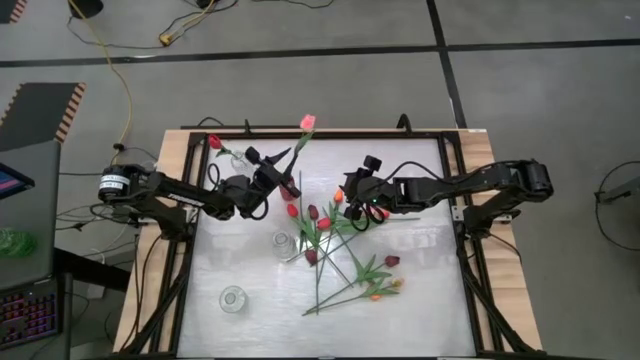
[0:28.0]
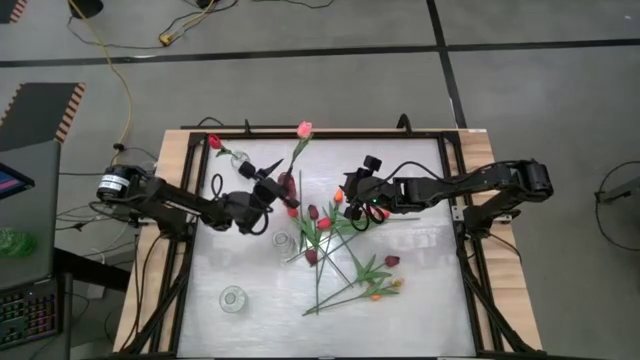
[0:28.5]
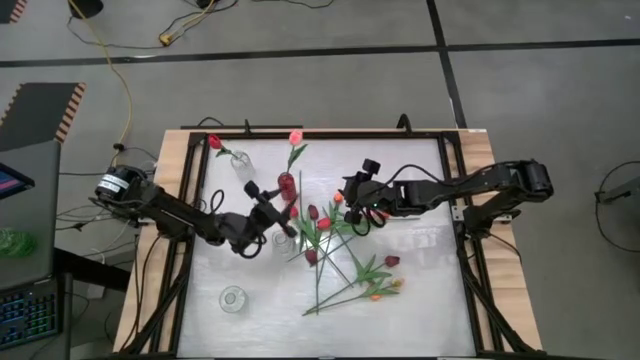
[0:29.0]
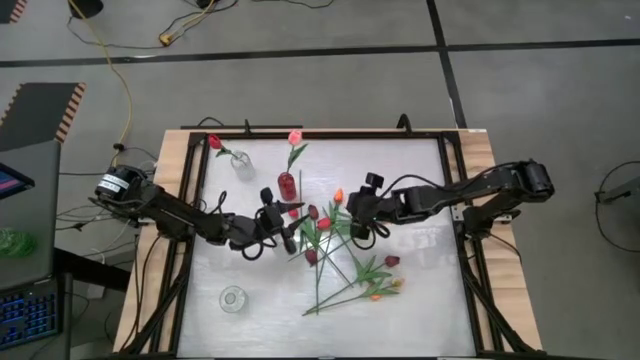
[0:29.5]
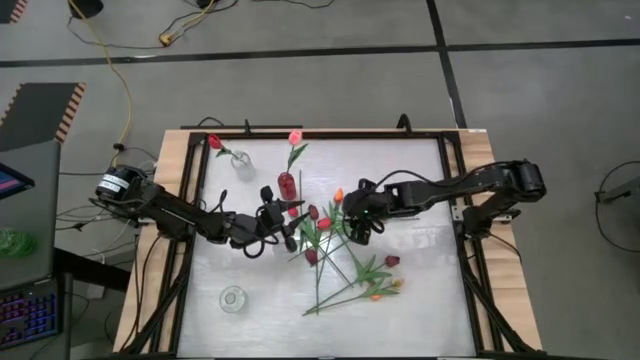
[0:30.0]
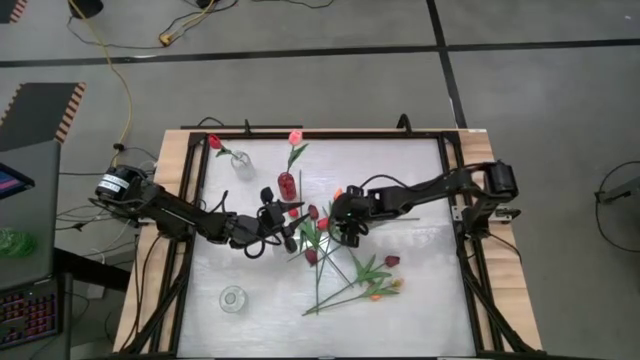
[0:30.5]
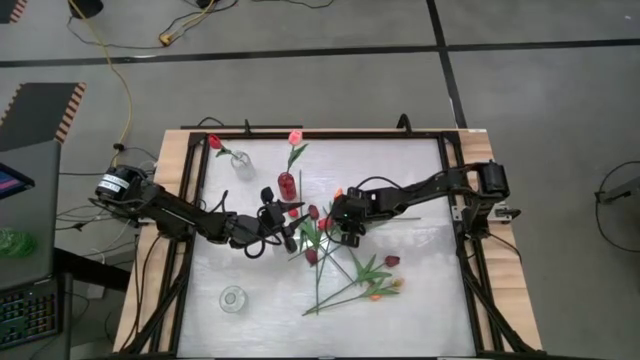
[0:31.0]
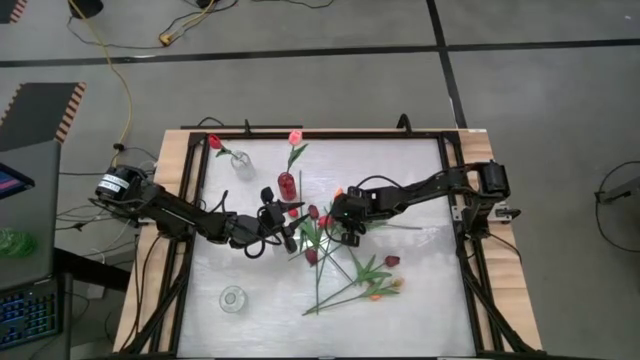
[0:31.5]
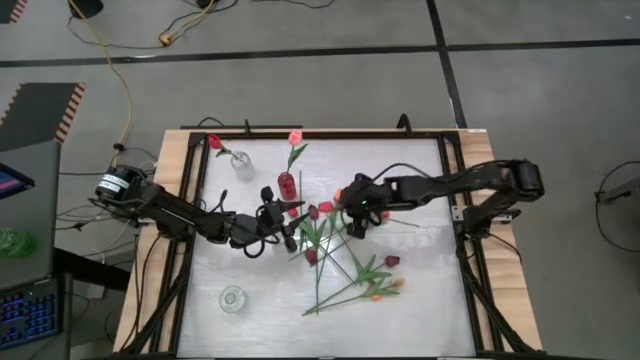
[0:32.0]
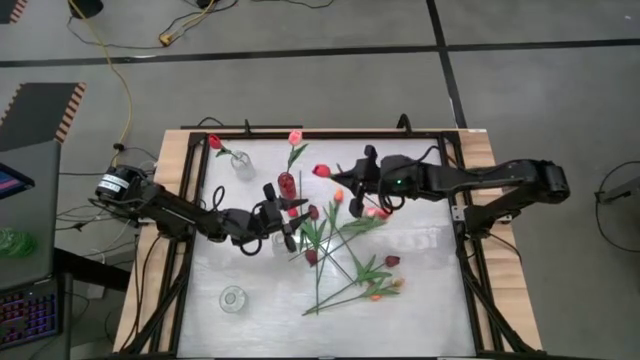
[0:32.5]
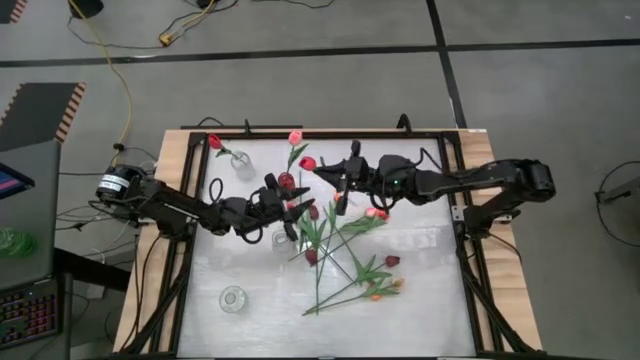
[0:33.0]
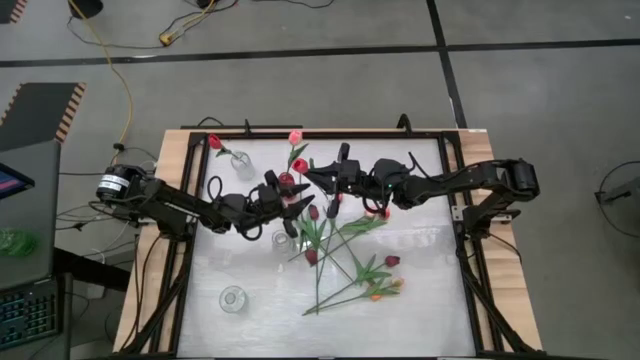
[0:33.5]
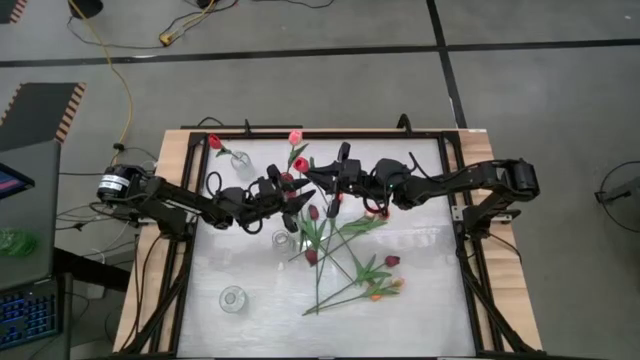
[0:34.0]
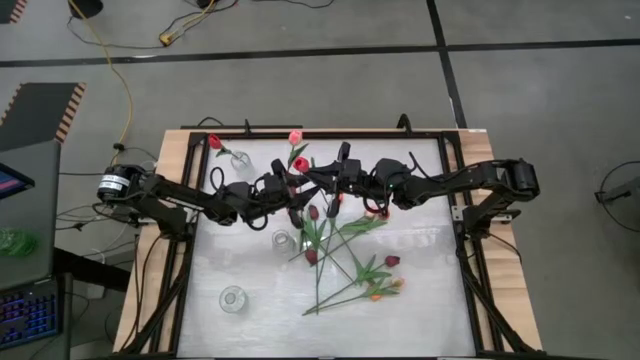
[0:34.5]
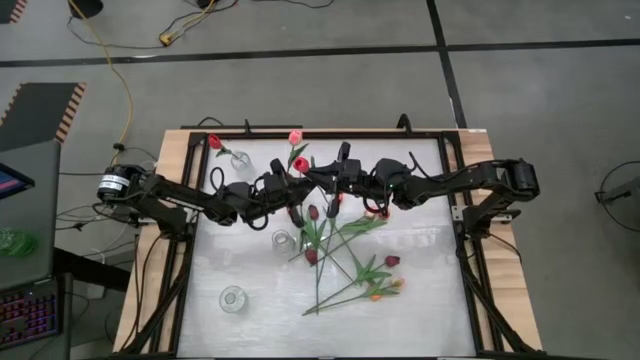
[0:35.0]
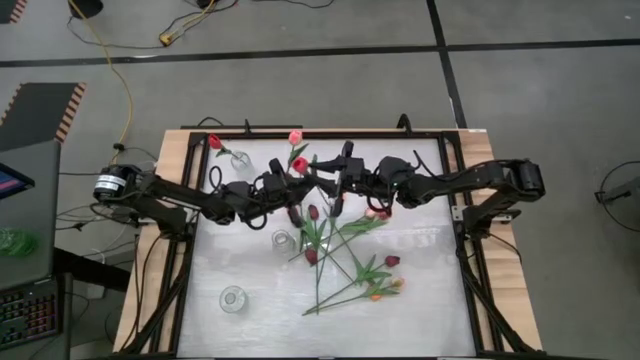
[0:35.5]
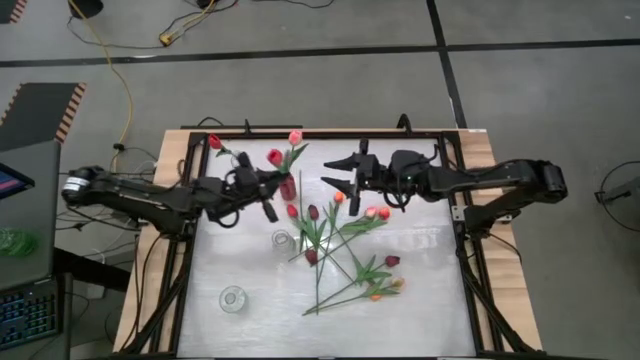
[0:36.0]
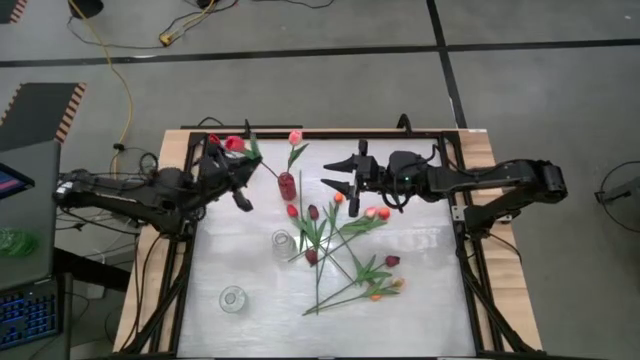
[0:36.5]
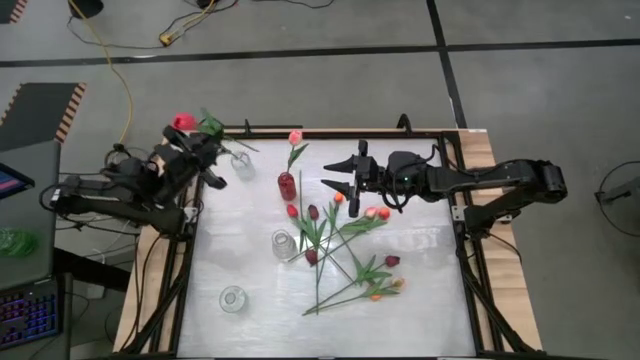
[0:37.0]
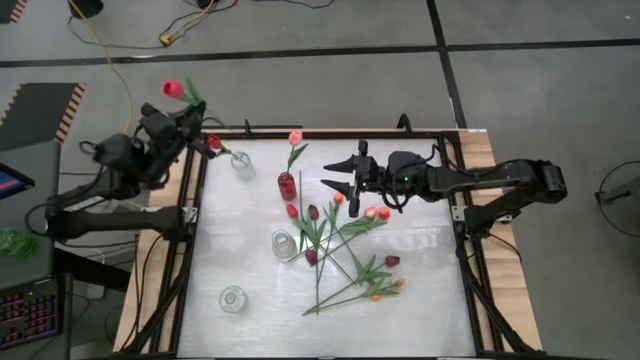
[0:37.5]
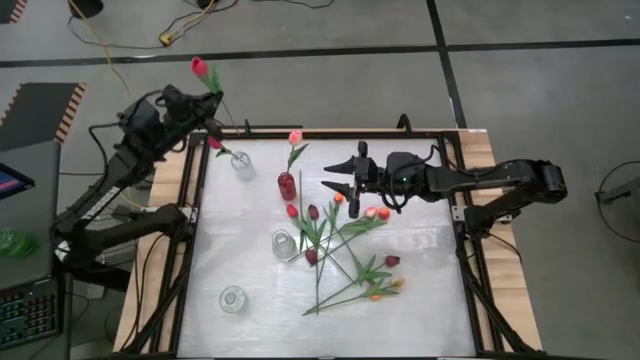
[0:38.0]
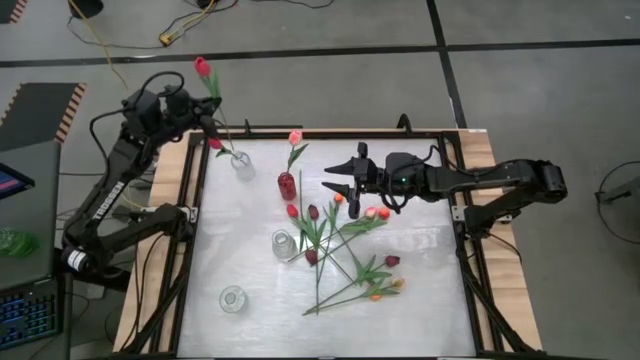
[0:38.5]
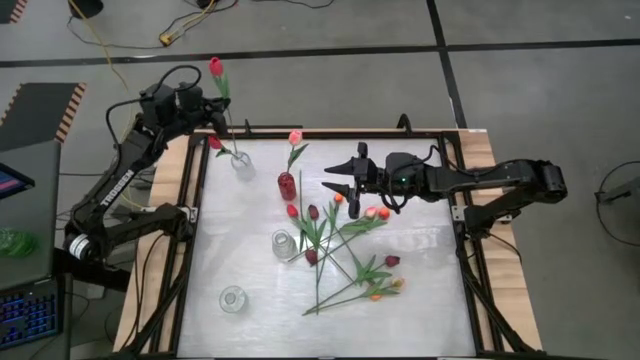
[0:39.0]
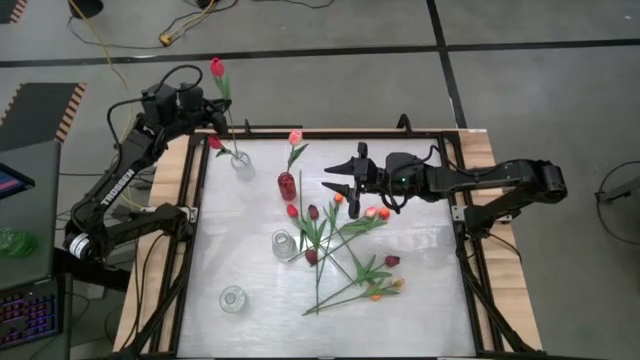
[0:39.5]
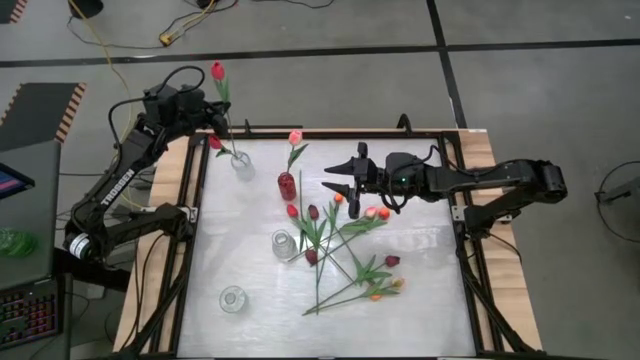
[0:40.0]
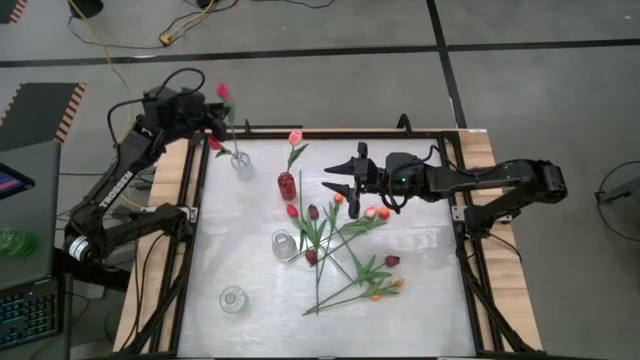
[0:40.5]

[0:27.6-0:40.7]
Task: Sort flowers into vase by color
Put the red tulip into the top transparent vase

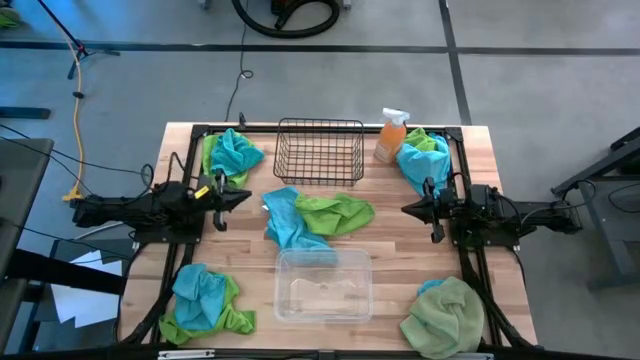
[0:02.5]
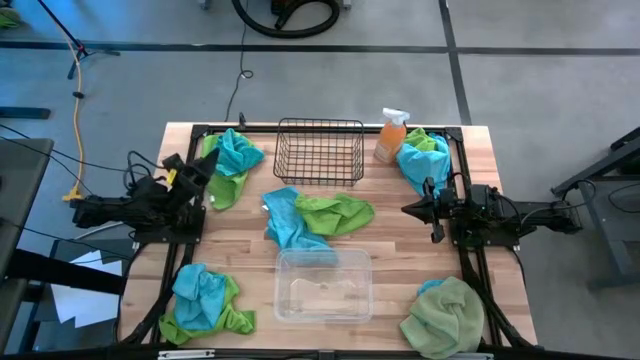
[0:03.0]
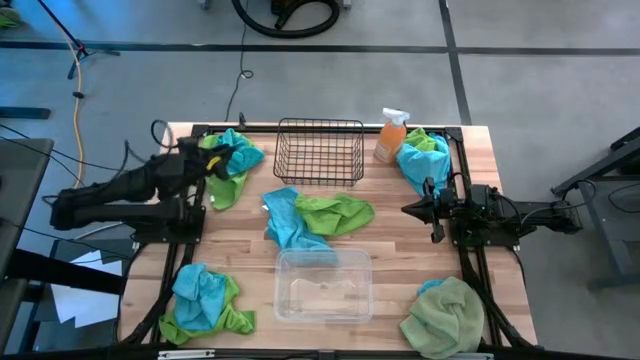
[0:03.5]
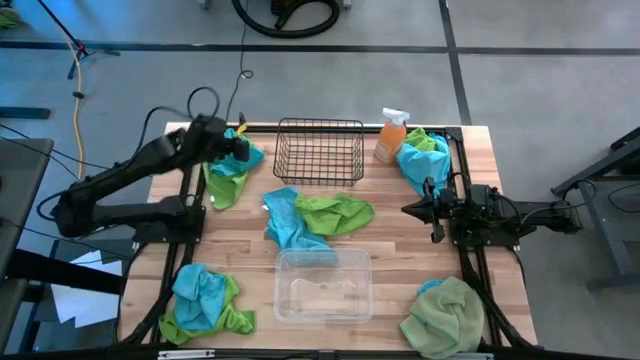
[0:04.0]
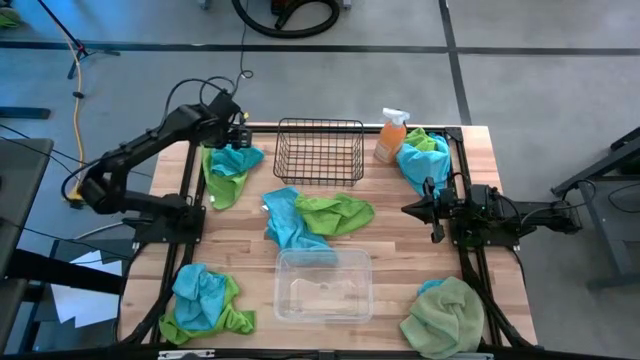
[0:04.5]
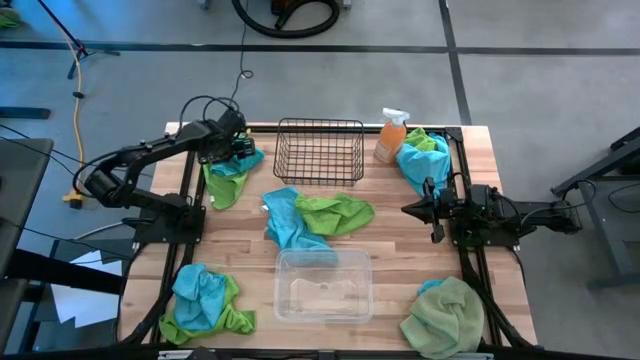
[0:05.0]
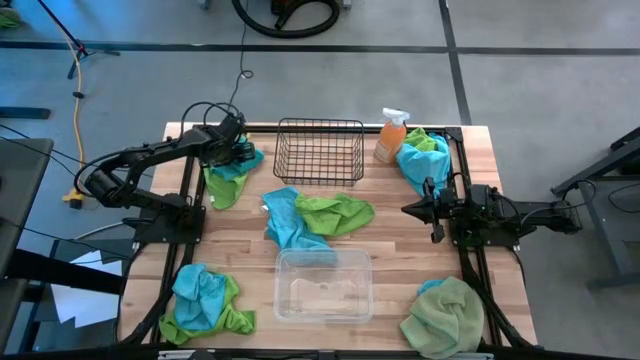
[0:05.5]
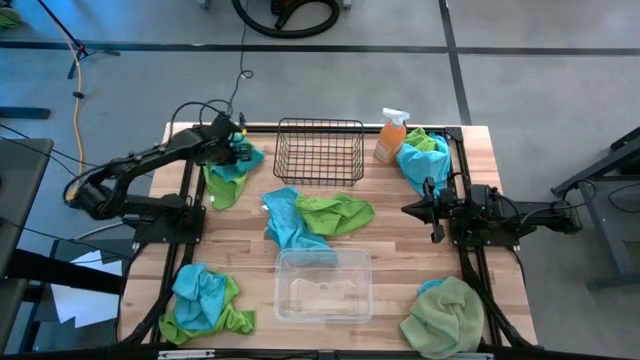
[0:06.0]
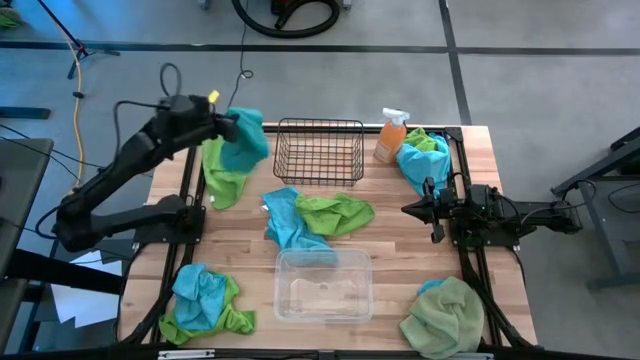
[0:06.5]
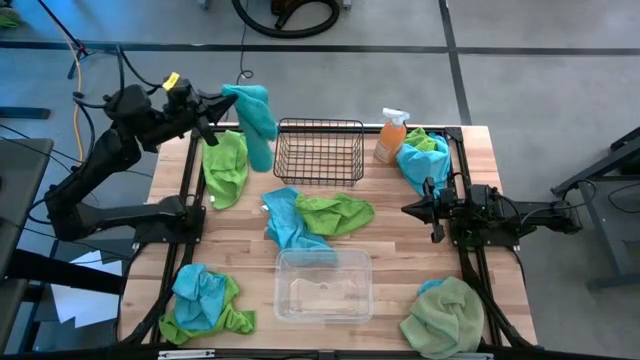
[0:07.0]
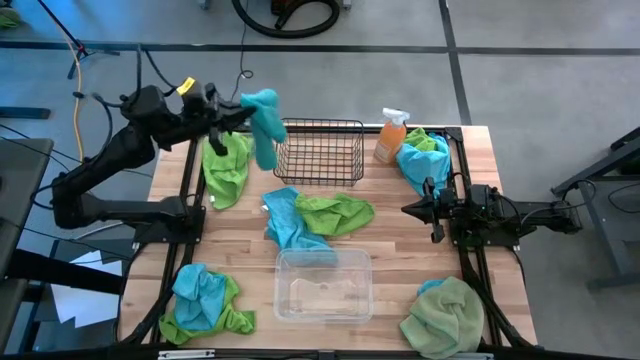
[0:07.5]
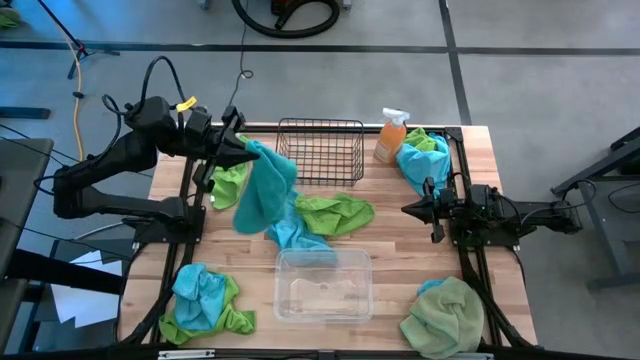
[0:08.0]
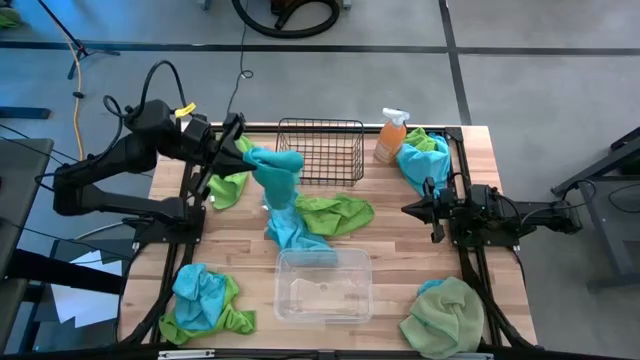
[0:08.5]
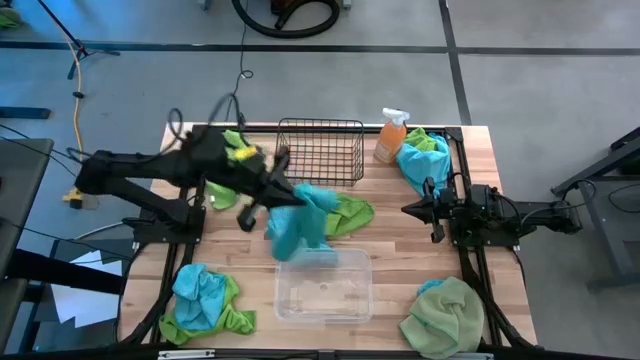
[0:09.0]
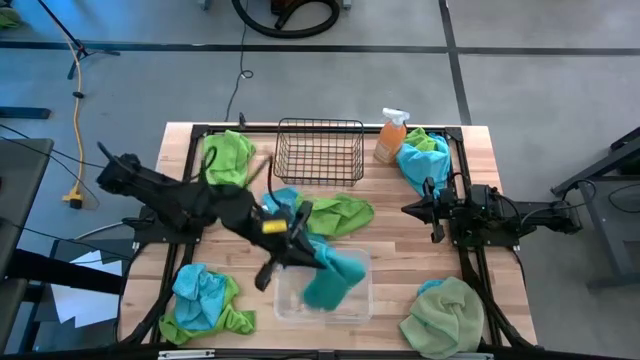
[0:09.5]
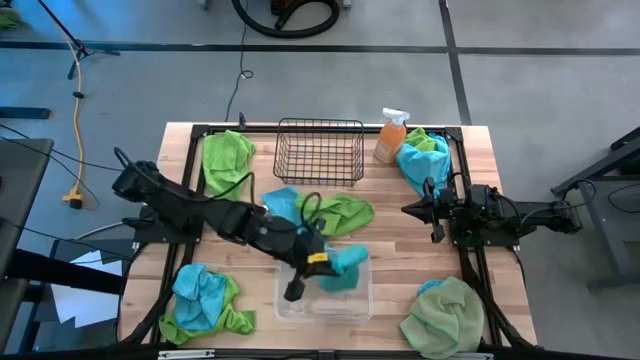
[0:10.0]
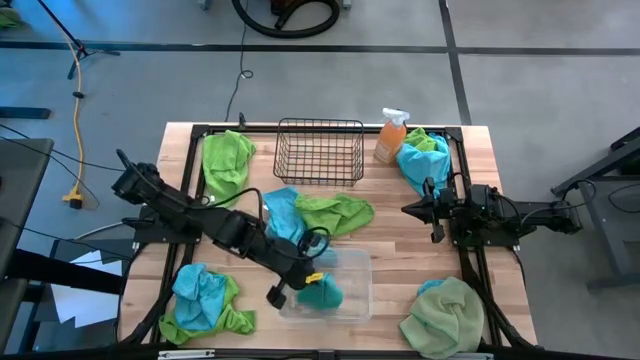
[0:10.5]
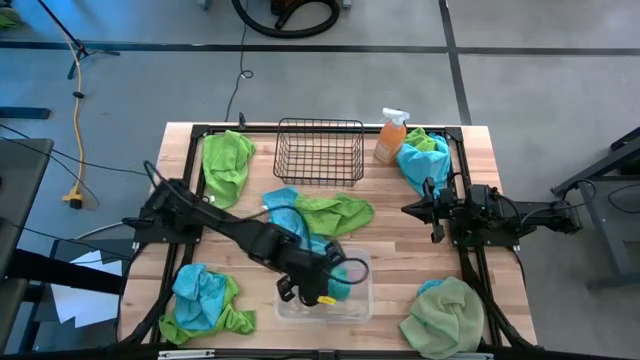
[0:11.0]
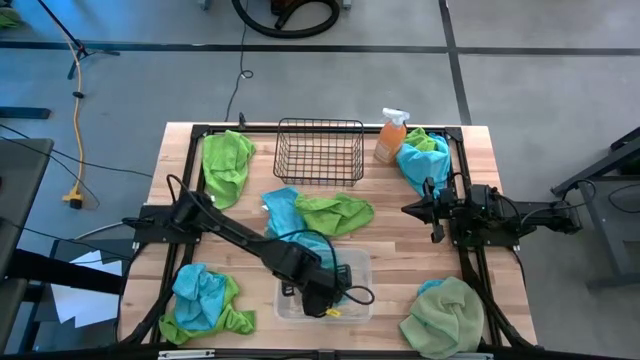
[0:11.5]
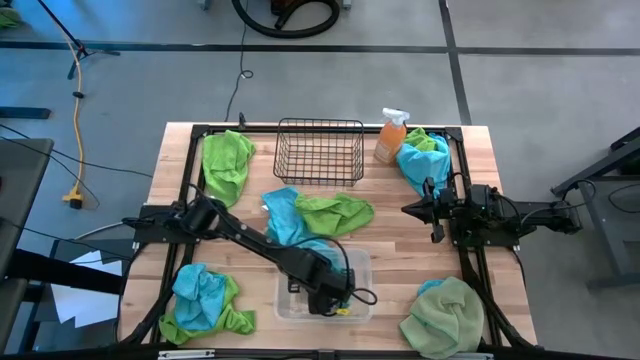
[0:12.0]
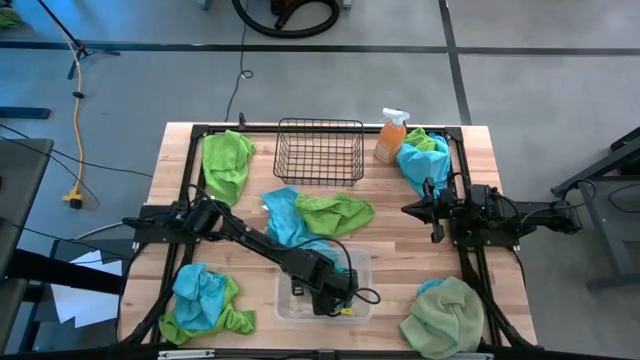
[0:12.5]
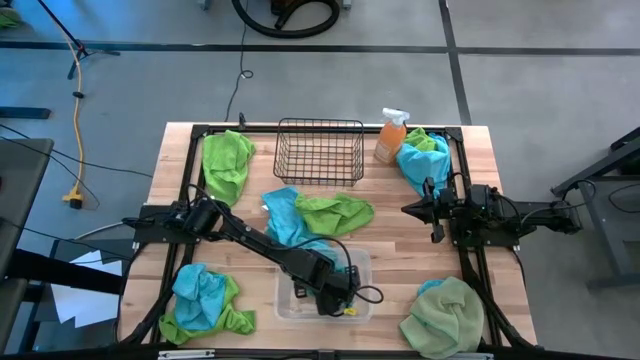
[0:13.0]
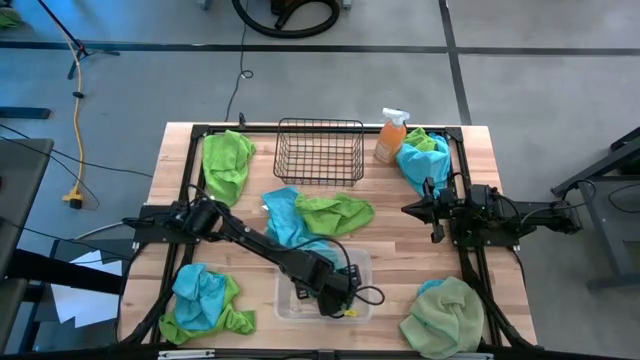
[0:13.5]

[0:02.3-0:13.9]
Task: Sort microfiber towel by color & place in baskets
Put the top left blue towel into the transparent bin
